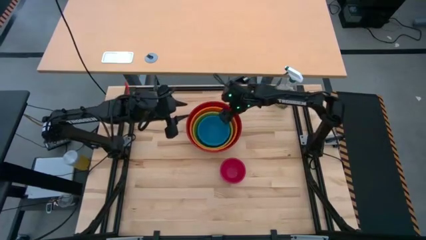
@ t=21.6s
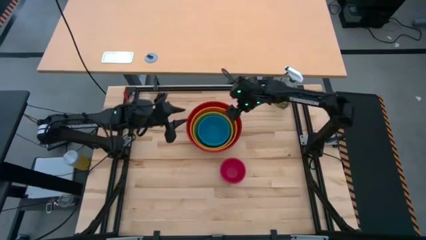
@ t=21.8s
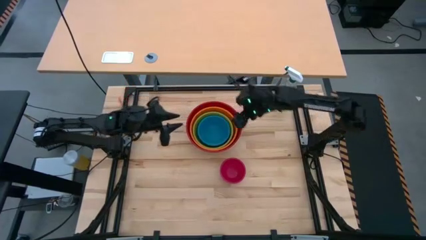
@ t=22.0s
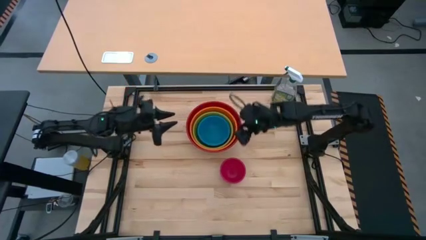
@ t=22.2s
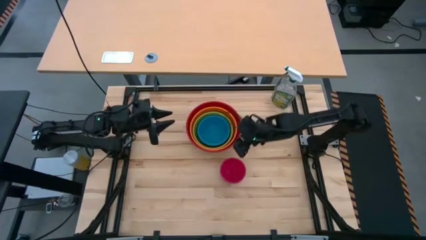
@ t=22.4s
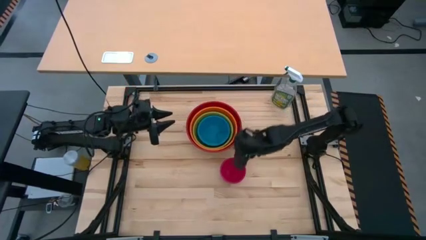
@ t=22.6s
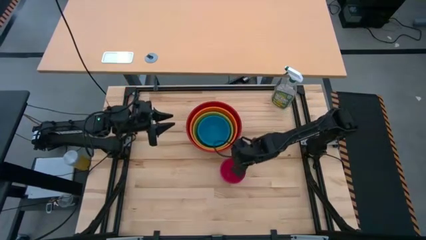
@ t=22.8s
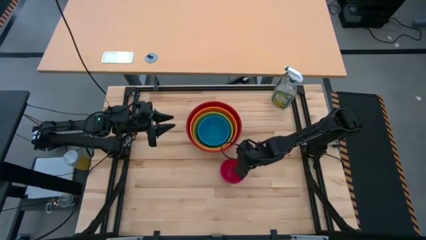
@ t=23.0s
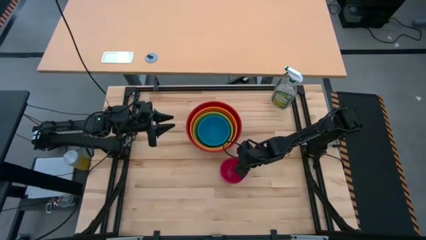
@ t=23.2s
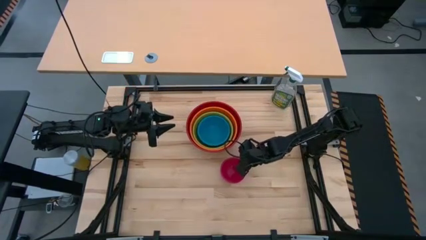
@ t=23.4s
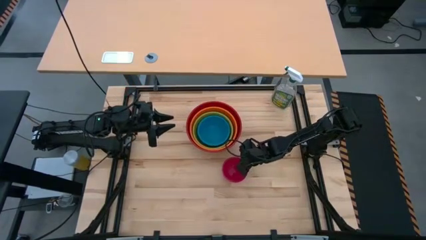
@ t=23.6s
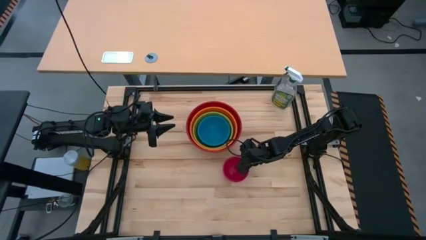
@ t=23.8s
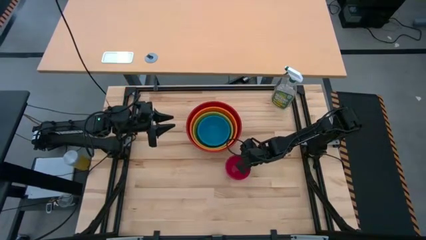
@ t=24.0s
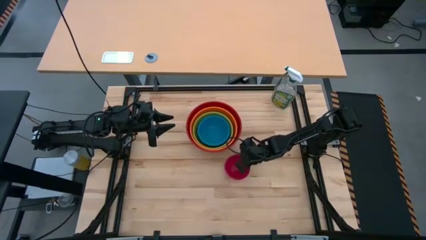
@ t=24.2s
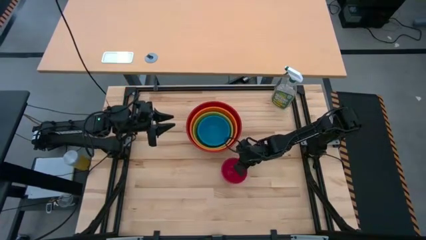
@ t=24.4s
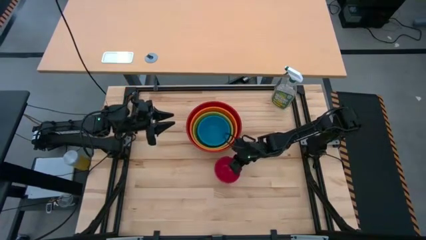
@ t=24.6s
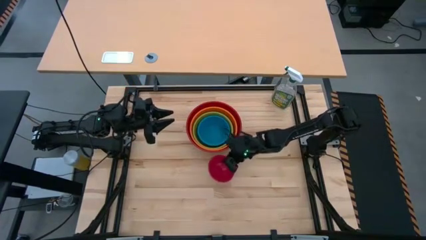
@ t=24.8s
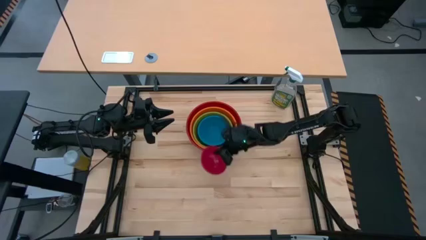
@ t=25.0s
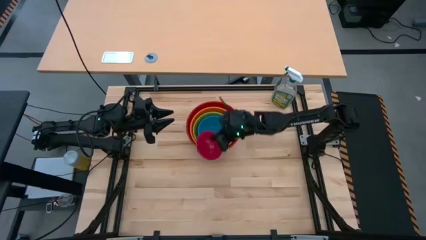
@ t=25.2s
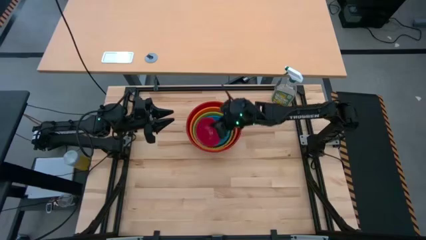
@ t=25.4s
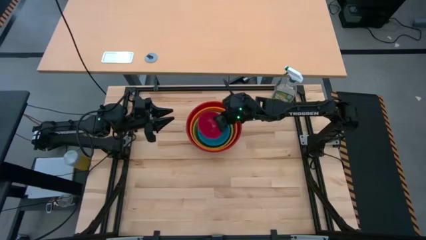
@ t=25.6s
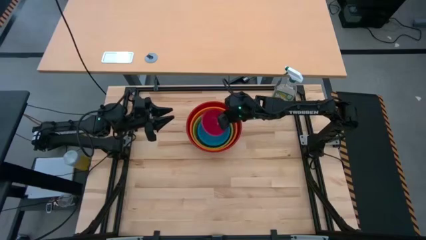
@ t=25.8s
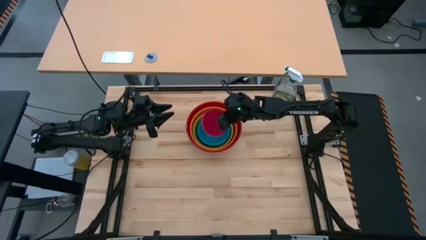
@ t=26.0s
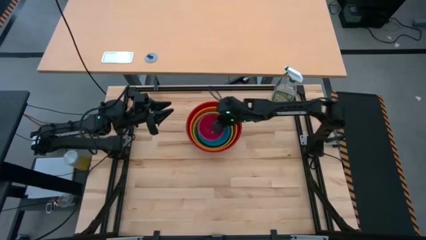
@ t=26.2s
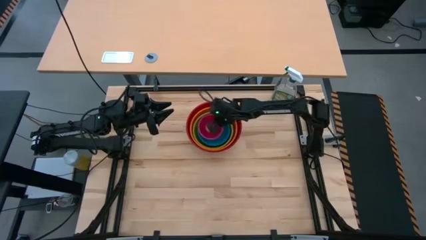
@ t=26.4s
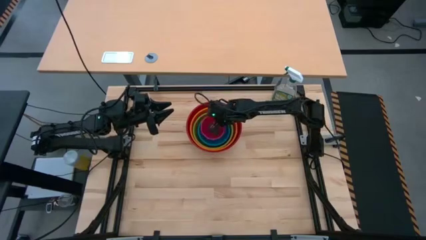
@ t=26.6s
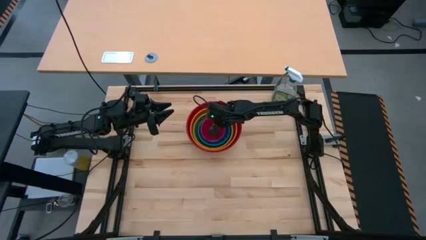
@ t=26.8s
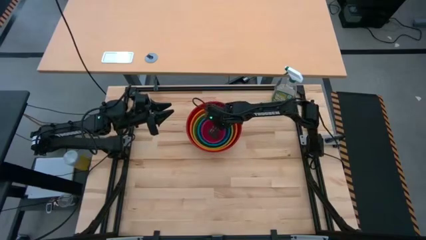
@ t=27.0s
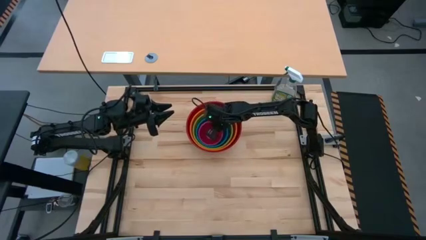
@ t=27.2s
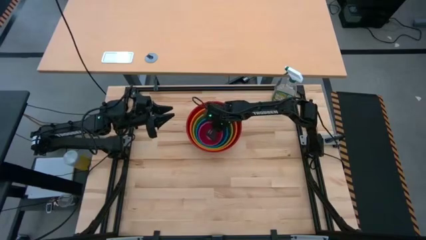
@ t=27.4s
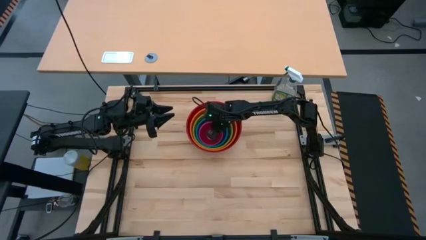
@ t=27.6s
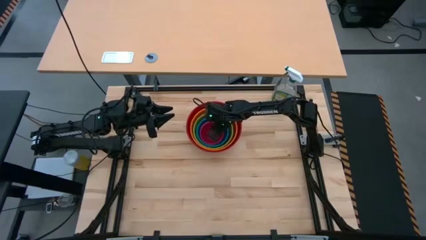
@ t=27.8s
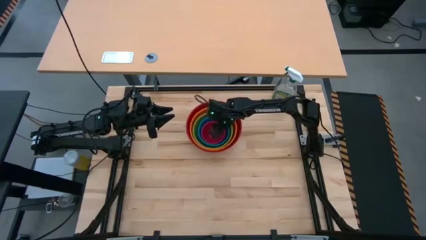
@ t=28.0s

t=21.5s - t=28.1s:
Stack the pink bowl on top of the blue bowl

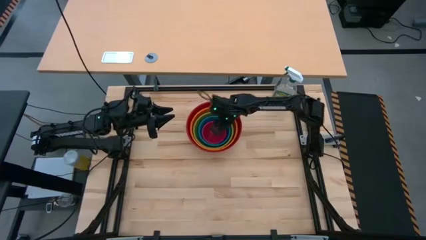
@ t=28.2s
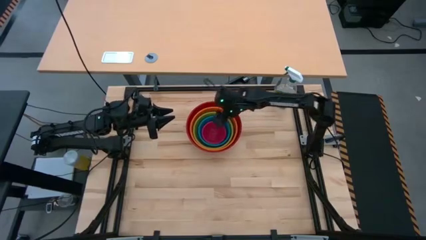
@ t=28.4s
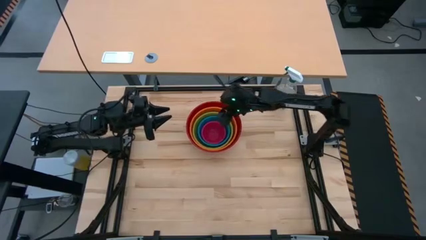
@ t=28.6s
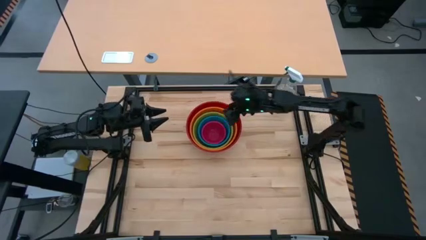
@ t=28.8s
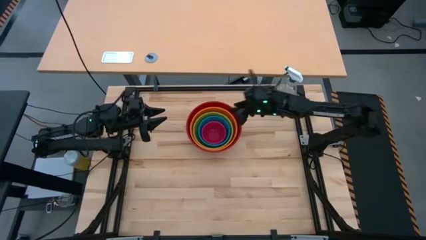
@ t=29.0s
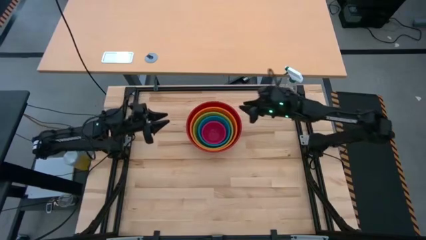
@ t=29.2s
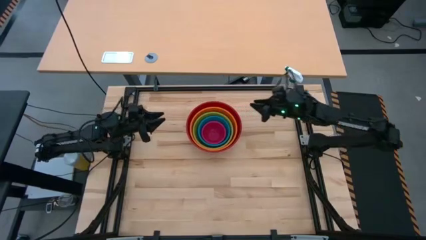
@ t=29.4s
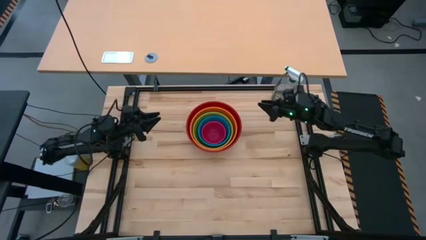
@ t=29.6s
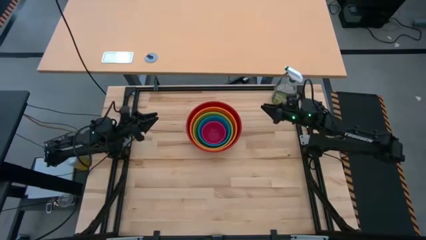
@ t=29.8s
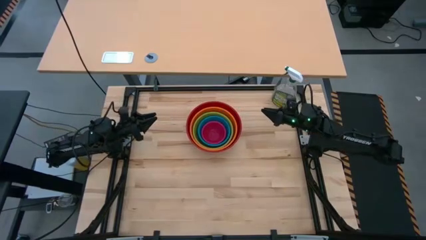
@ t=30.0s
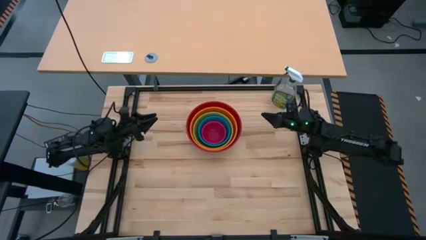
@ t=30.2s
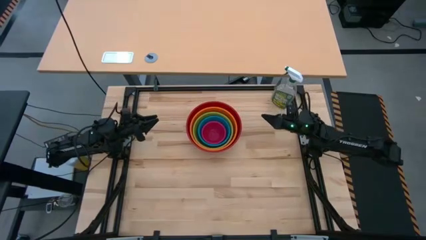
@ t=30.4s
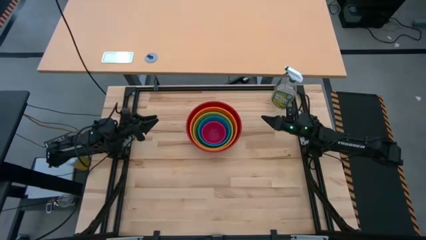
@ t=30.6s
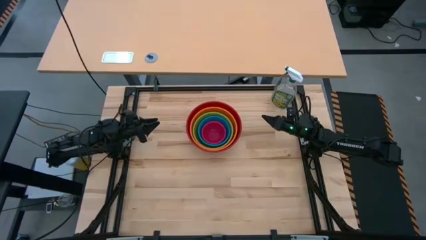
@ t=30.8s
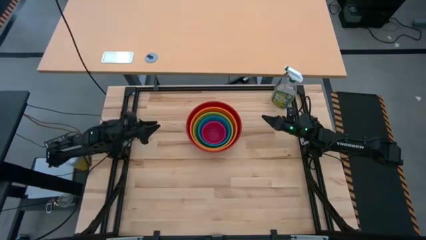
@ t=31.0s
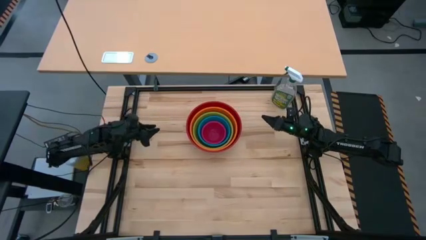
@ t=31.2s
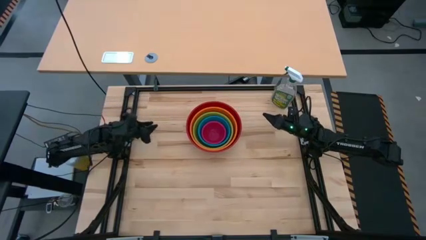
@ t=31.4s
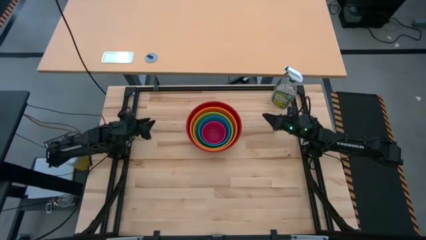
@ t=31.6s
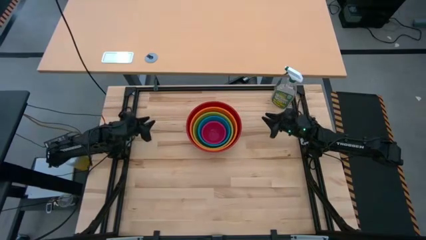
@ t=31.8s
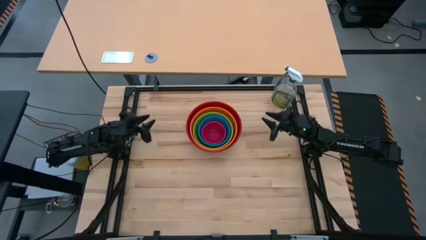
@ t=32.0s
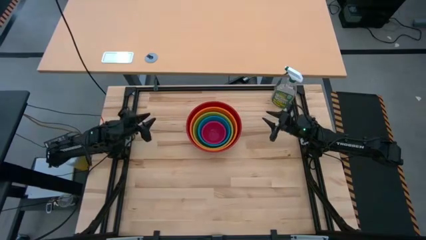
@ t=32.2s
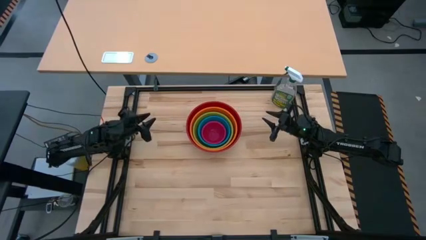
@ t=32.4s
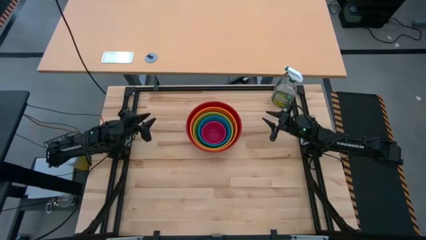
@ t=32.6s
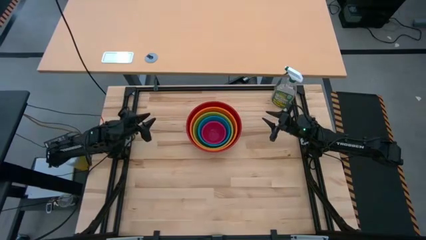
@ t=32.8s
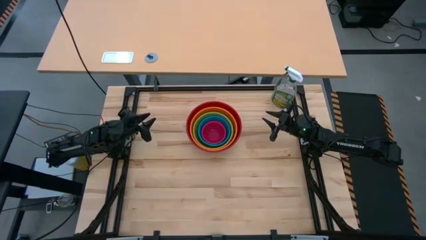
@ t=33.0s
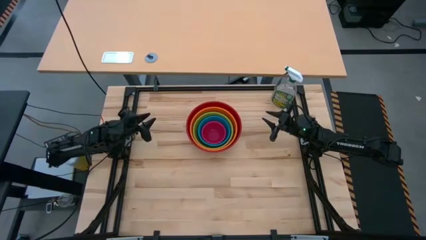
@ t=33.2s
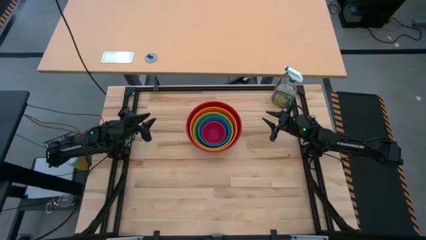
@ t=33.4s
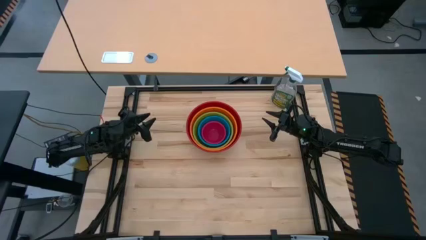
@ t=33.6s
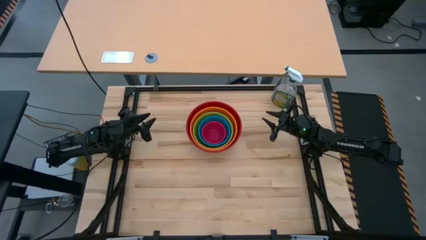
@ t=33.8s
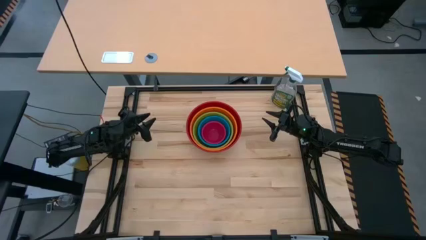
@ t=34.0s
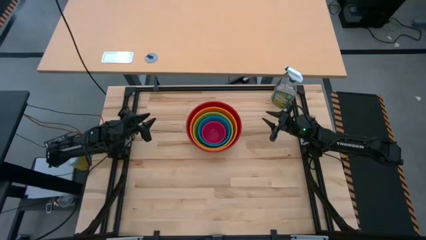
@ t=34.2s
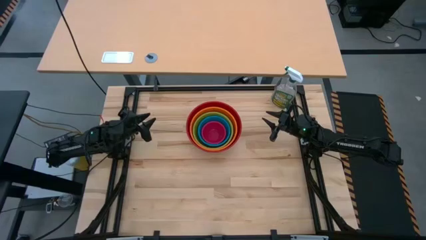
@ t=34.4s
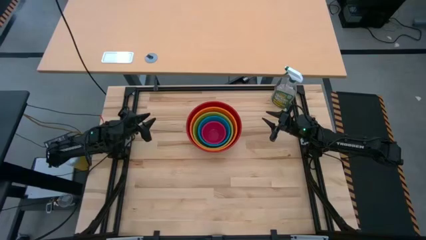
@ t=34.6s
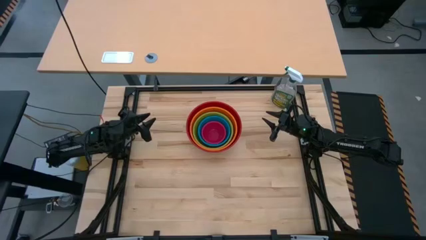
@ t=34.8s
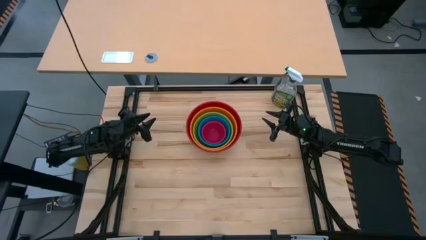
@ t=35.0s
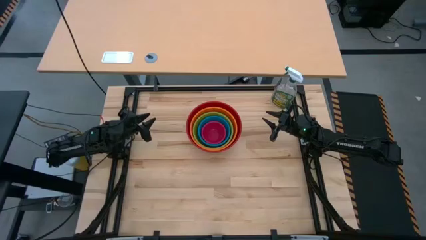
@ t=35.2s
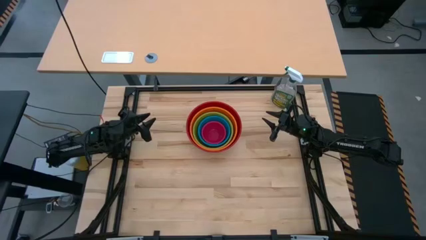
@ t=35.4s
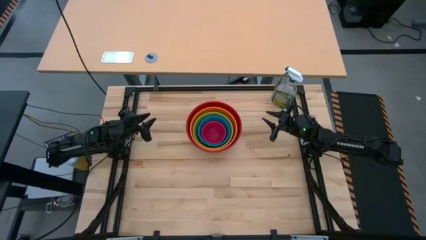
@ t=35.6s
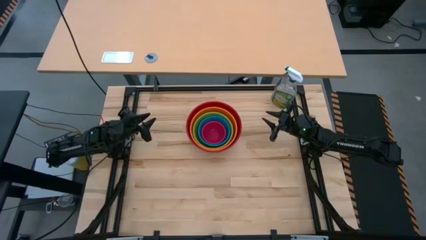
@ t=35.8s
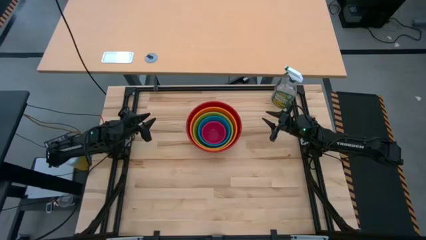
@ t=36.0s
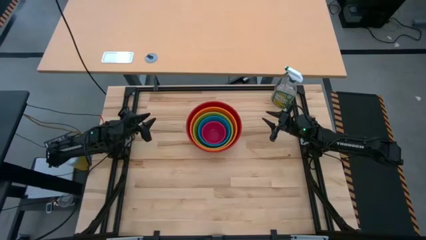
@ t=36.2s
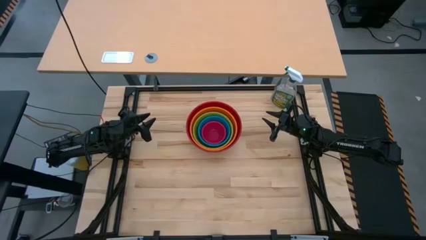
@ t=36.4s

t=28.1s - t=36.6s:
Return to Home Position
